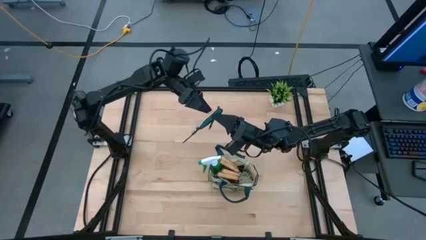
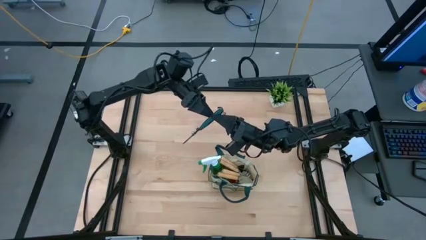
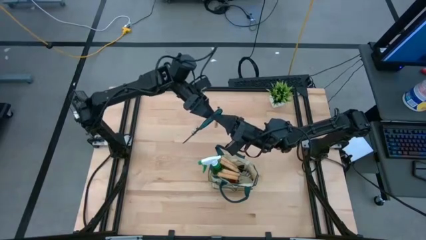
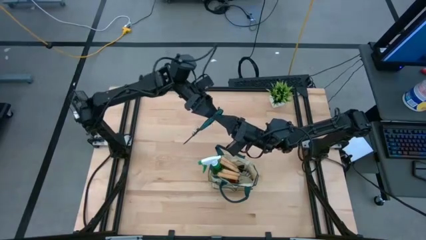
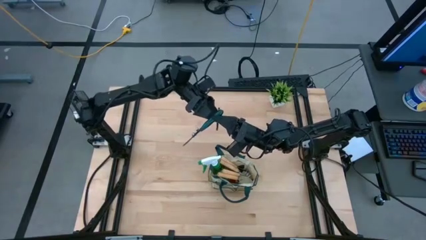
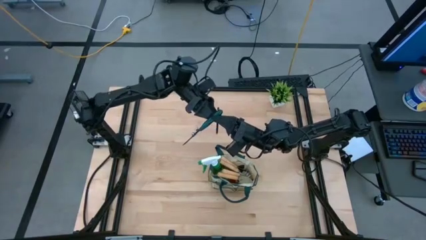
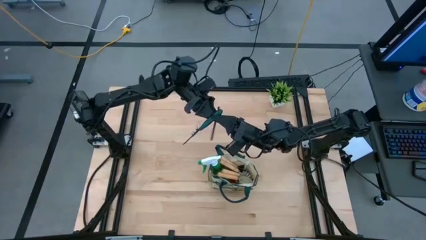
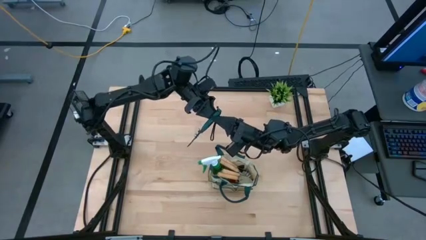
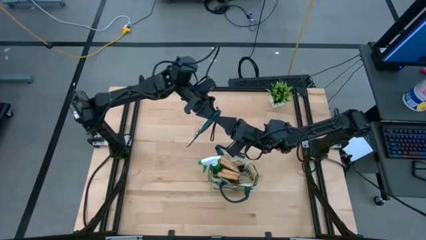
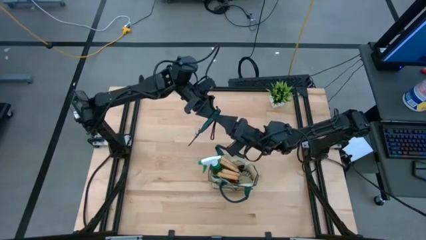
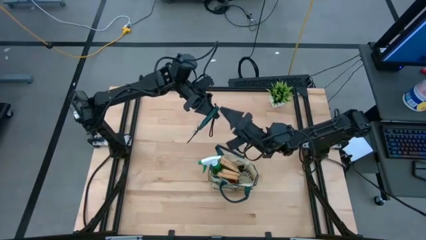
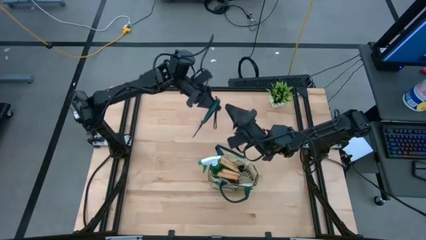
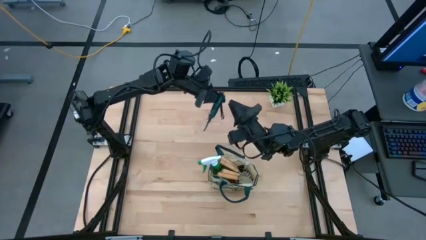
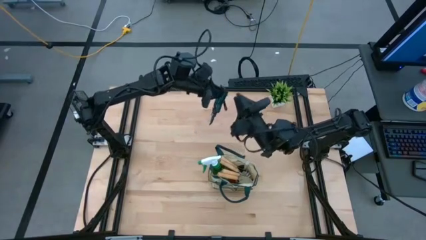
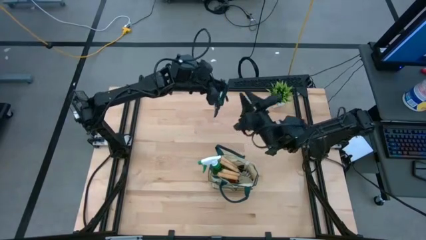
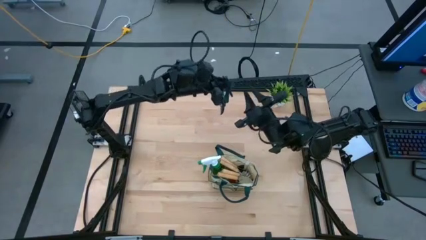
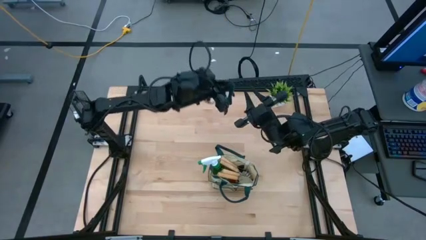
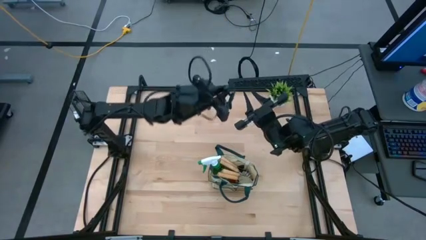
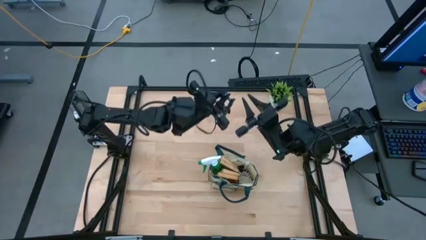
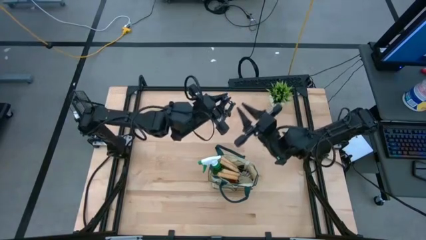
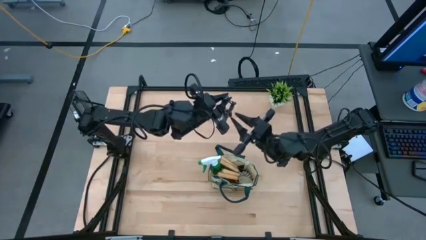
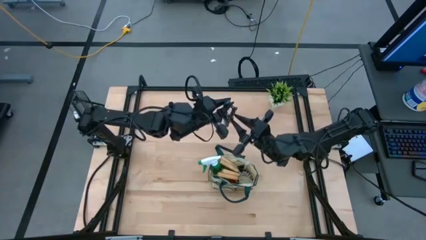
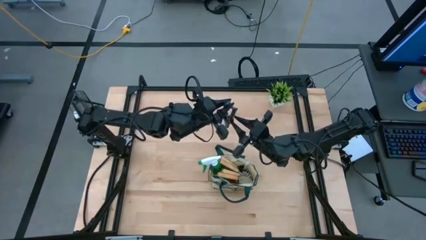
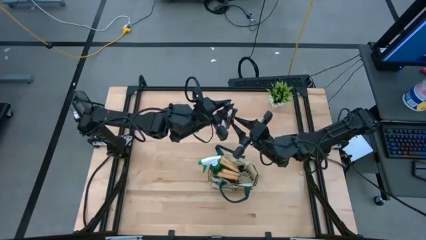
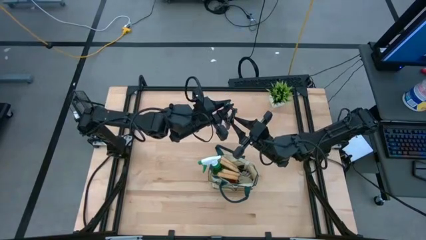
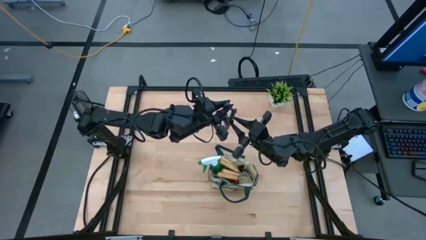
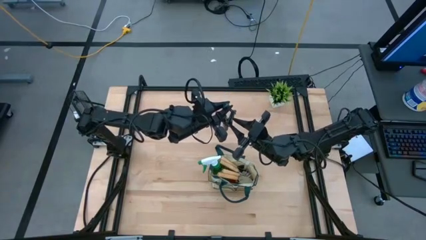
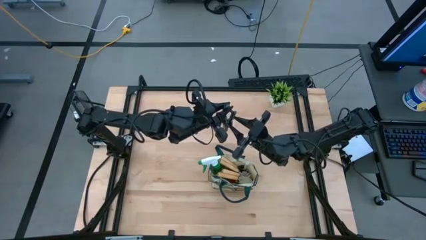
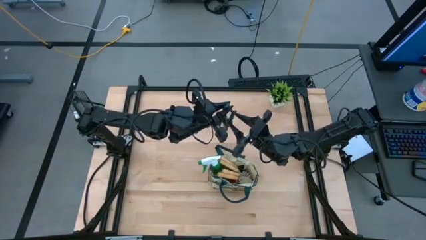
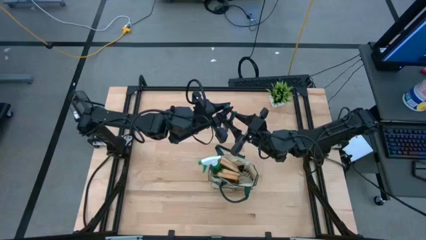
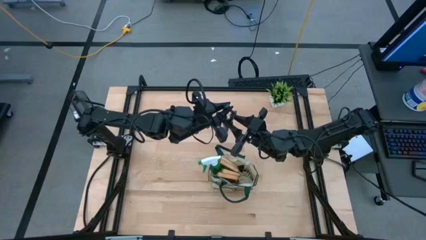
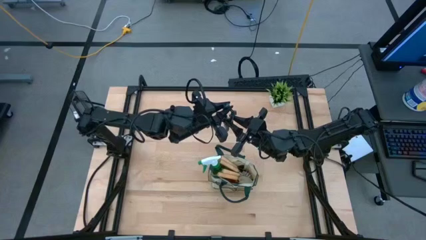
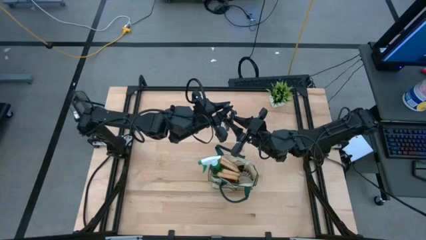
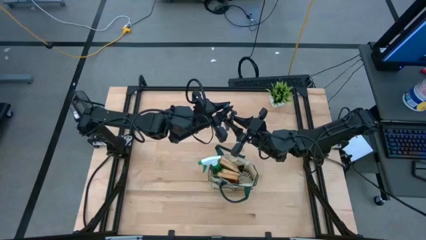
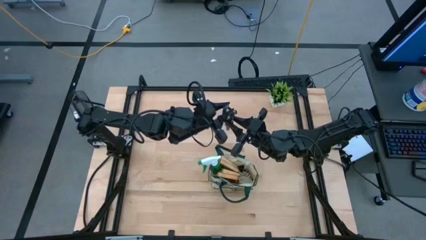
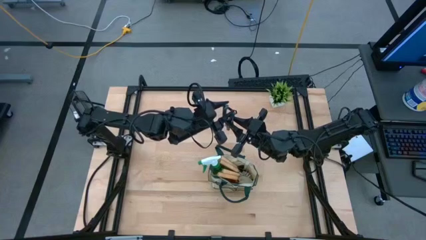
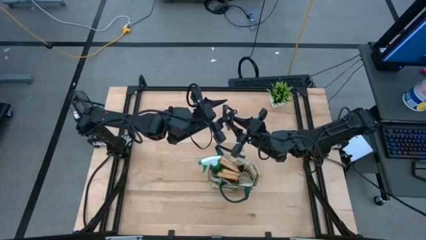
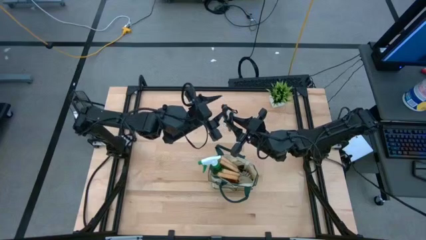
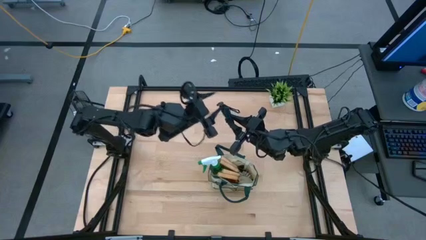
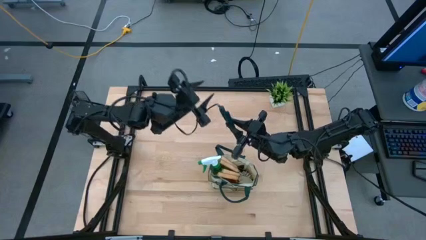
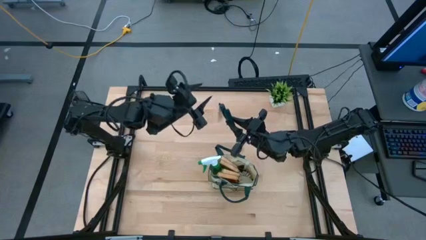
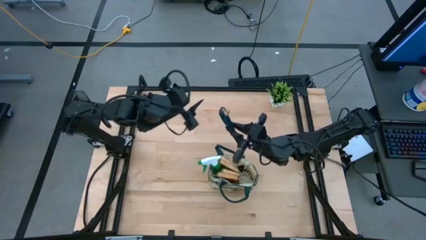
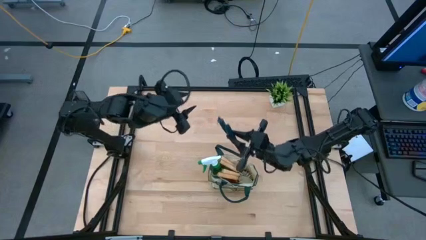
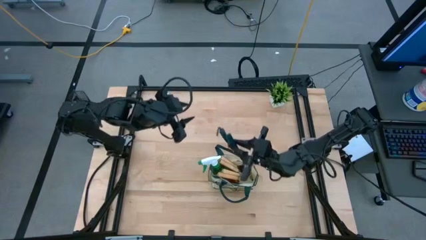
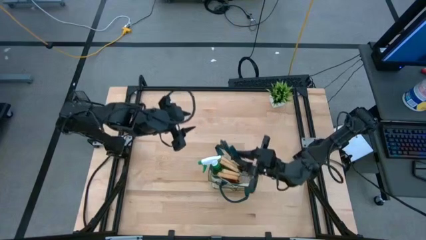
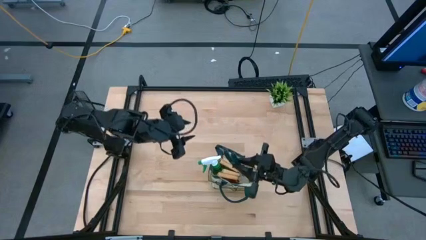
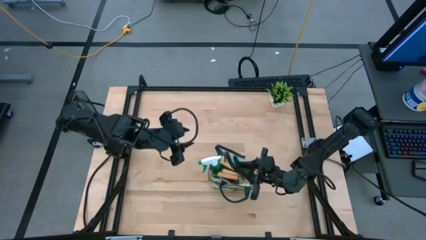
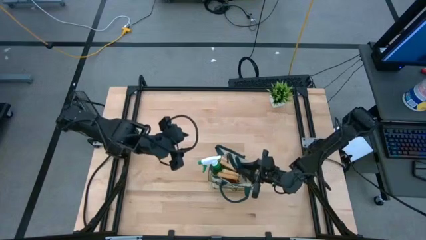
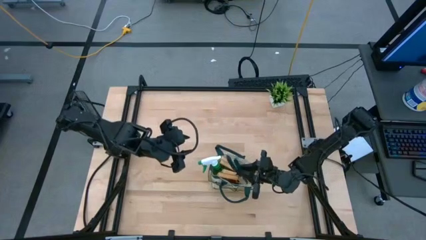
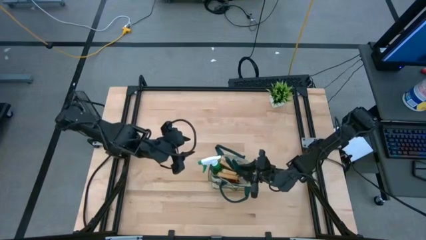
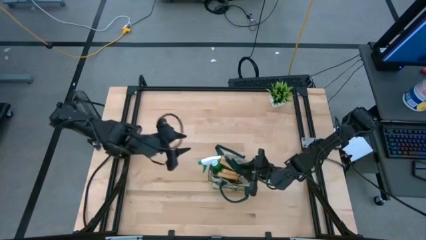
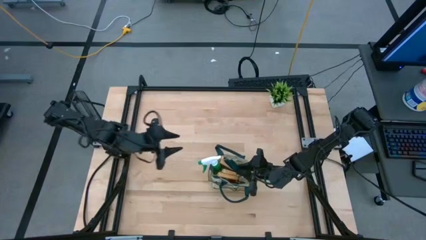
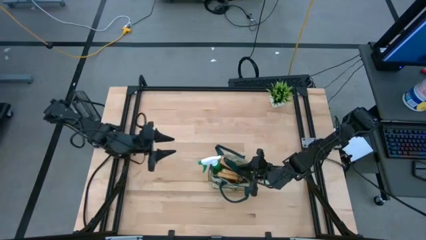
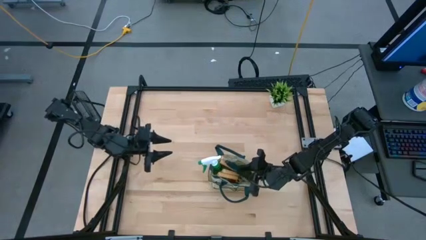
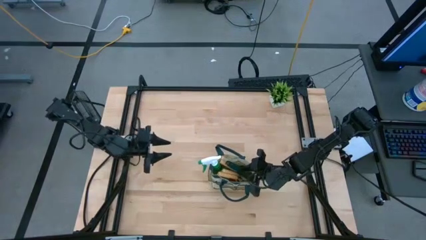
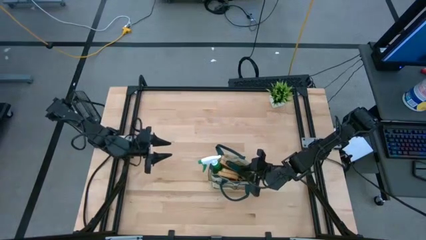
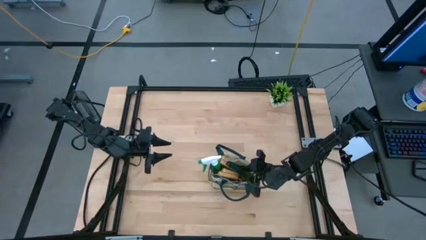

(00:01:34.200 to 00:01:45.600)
Task: Pick & Place Garden tools in Gardening bag
Put the green shear scissors into the gardening bag

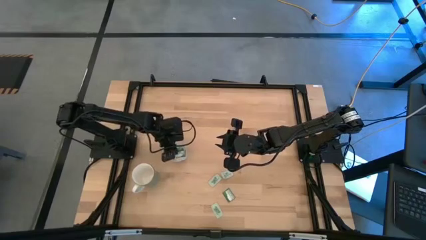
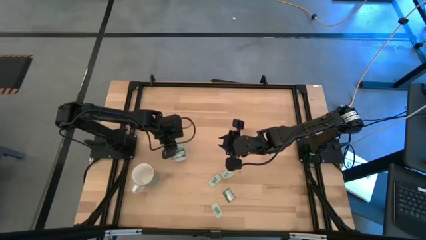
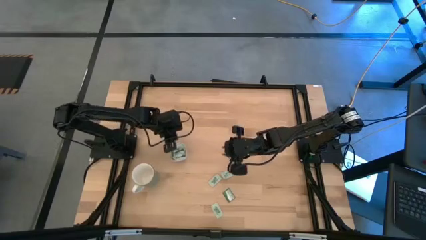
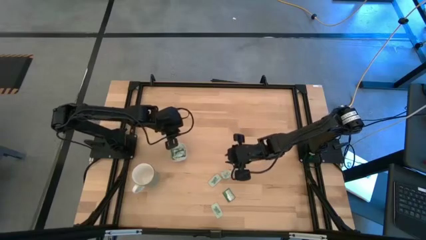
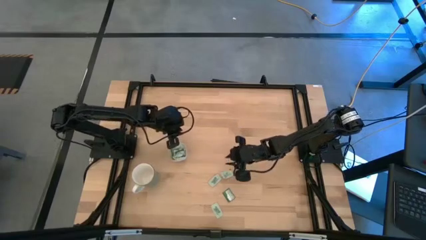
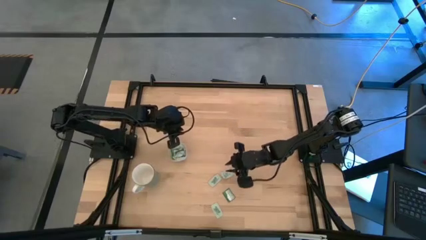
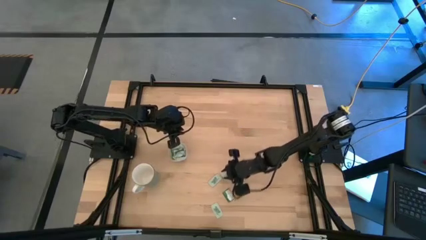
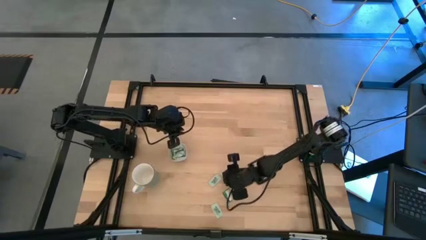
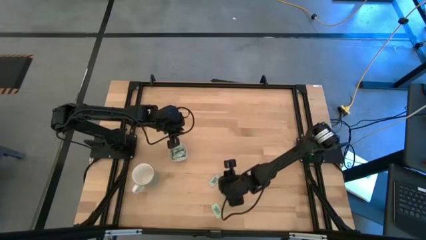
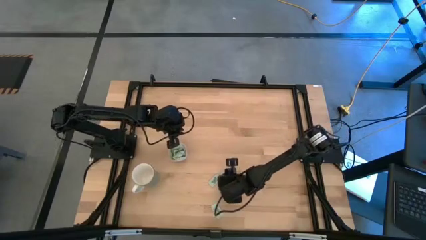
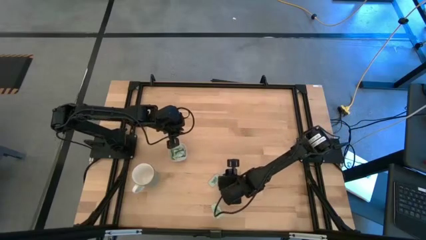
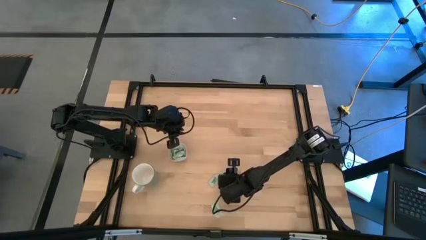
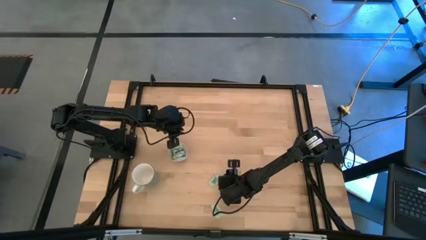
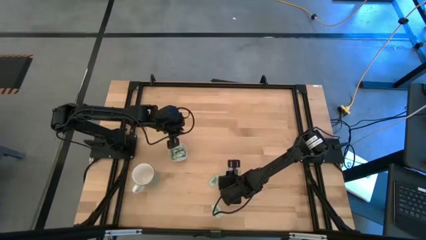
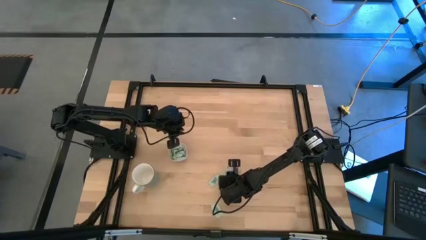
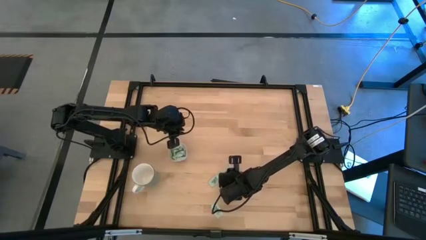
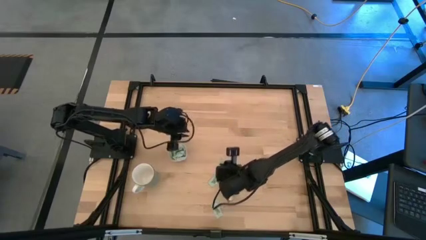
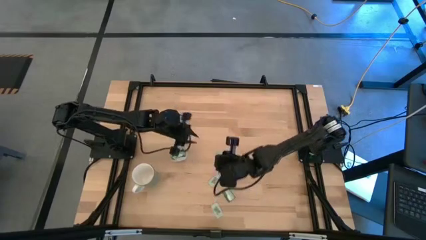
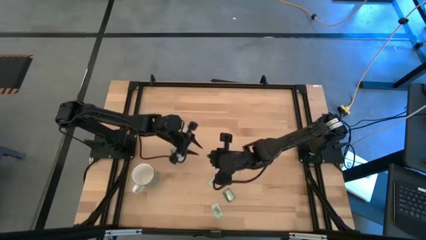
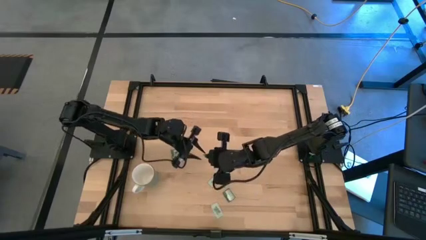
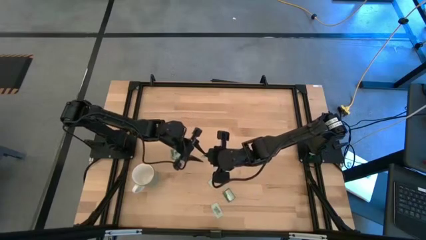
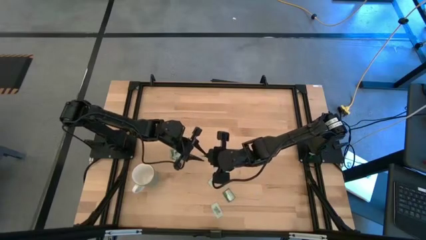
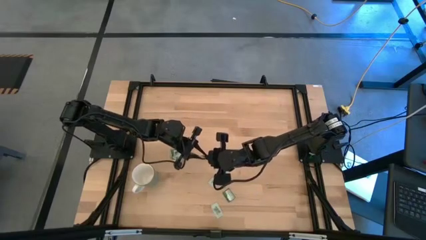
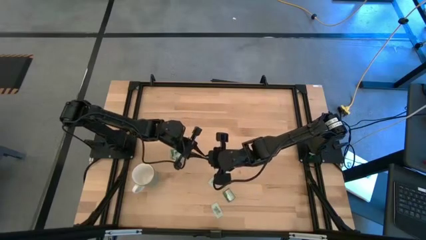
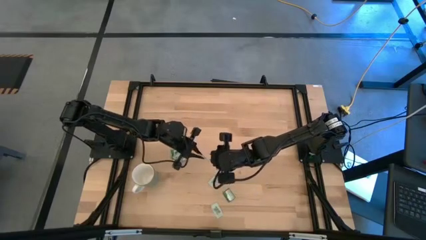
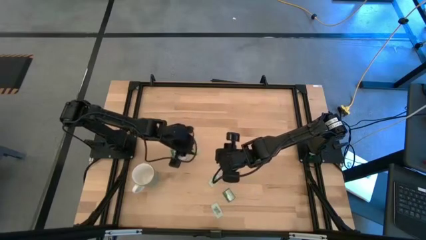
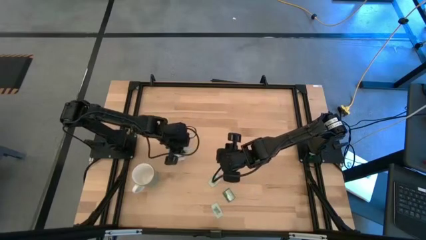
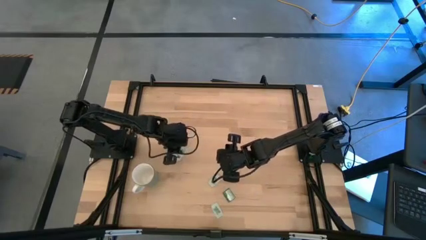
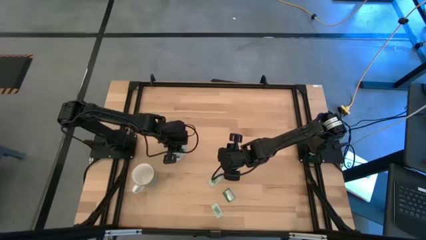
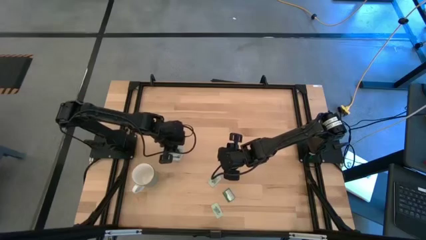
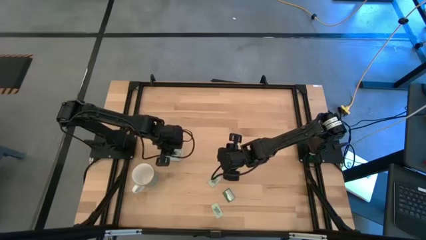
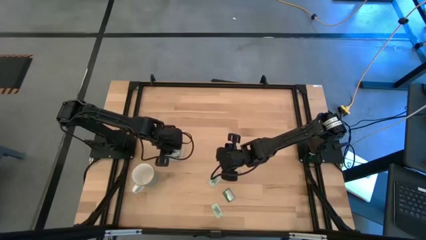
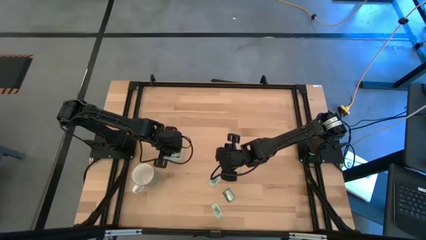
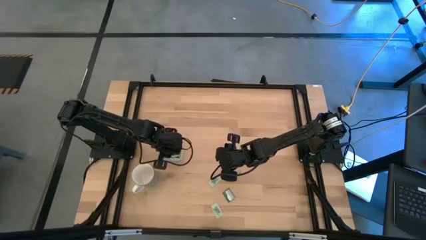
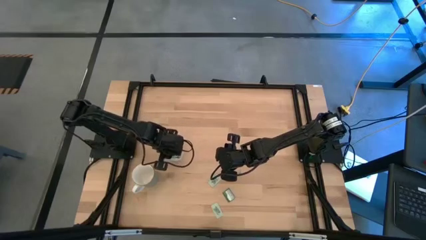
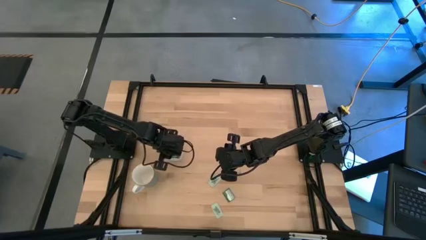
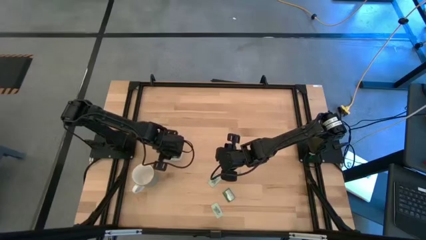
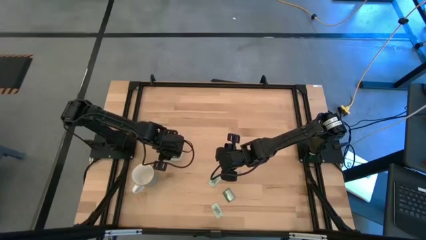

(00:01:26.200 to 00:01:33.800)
Task: Pick and place Stevia / Truvia into bins
Put the green stevia packet into the transparent container
